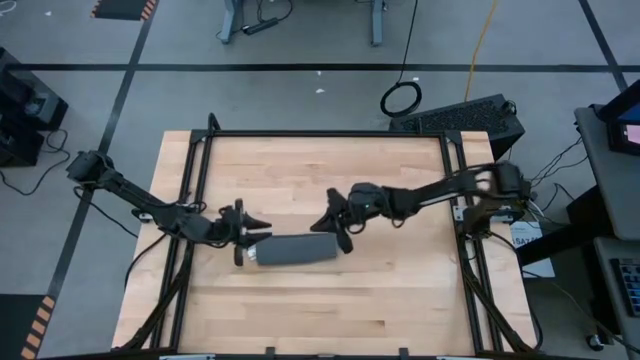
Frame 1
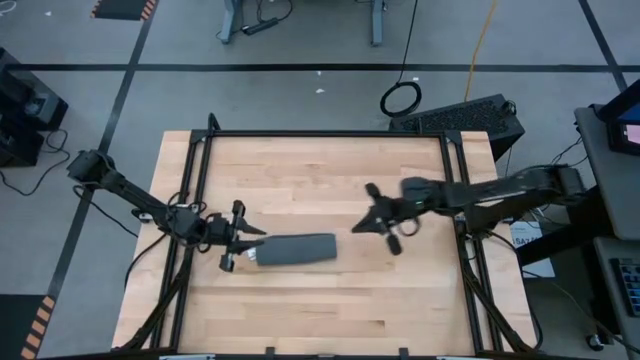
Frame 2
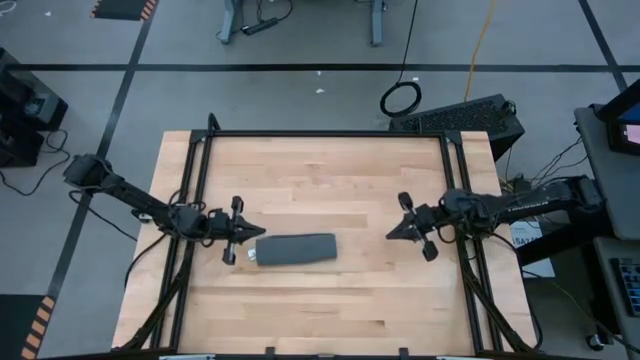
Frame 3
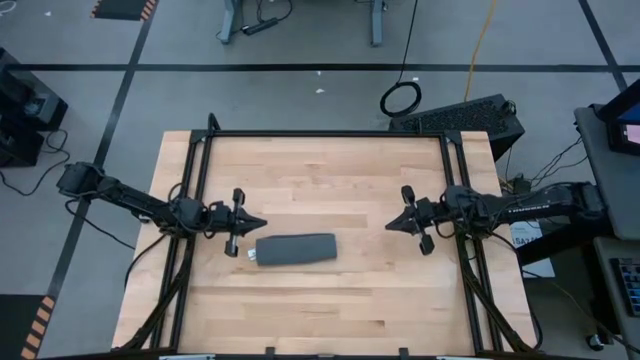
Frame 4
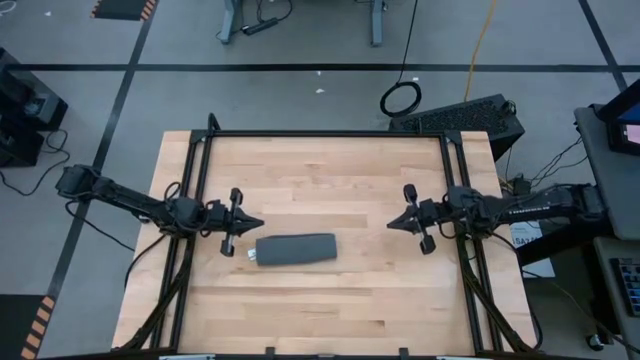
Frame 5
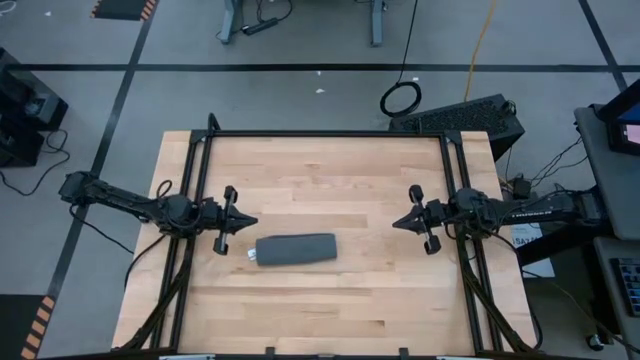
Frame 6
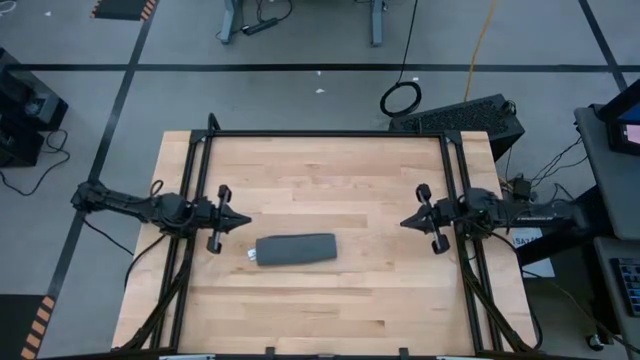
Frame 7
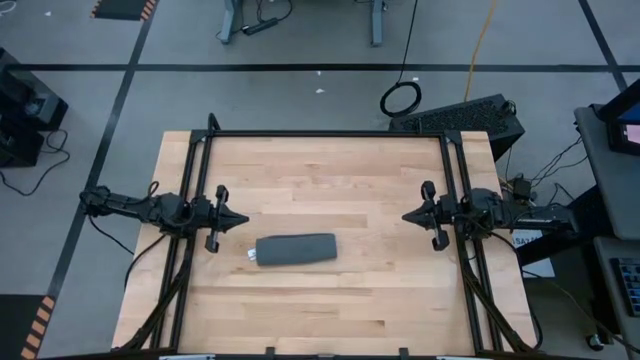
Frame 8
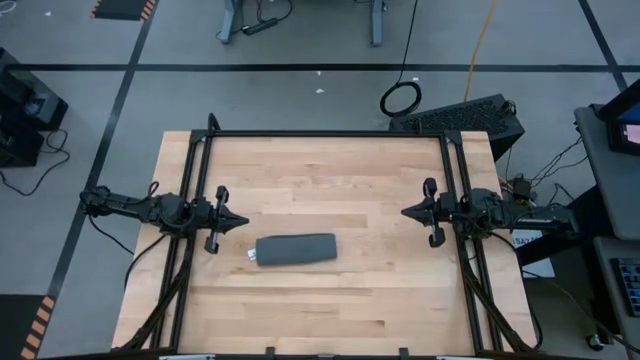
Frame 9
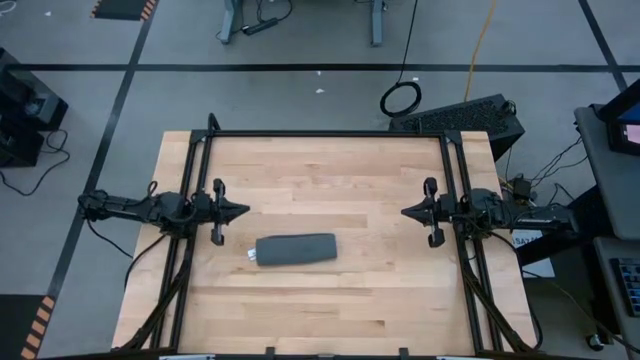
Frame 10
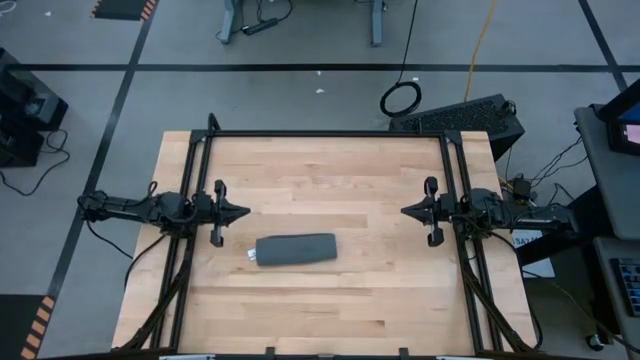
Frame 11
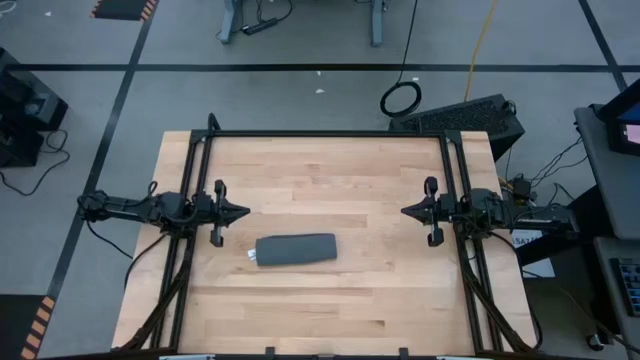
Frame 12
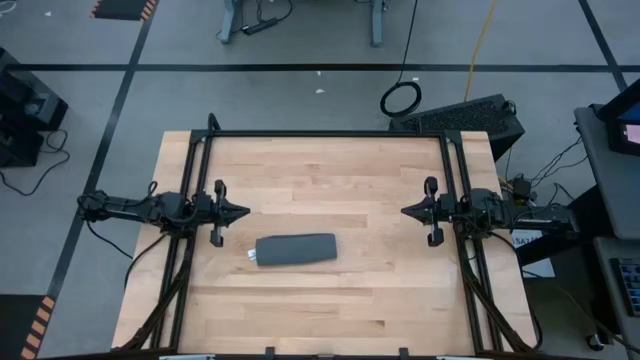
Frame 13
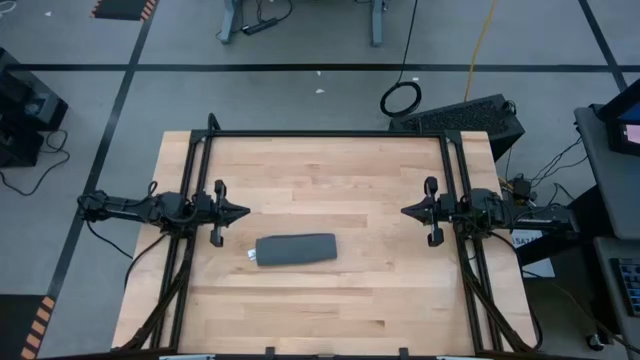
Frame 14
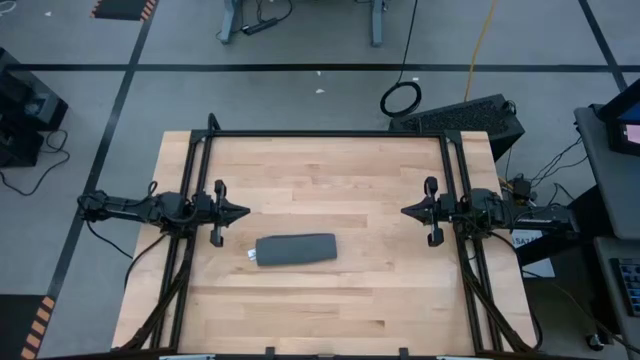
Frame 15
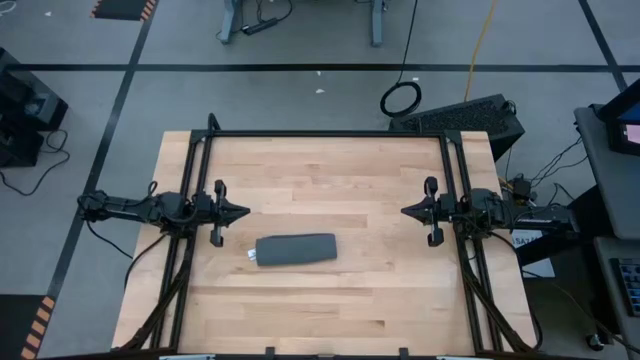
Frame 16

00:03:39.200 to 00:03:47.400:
Task: Roll towel into tight, uniform cylinder
Return to Home Position

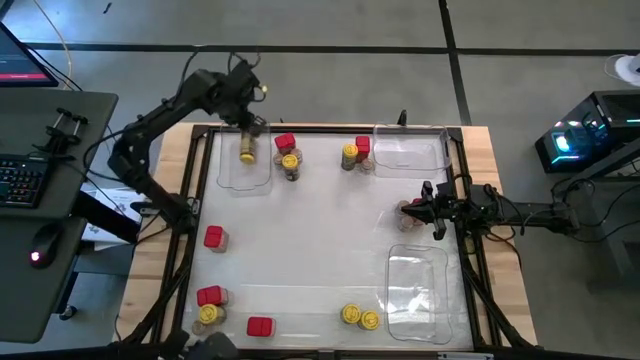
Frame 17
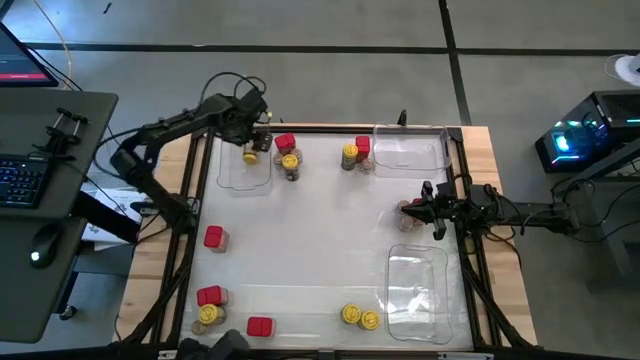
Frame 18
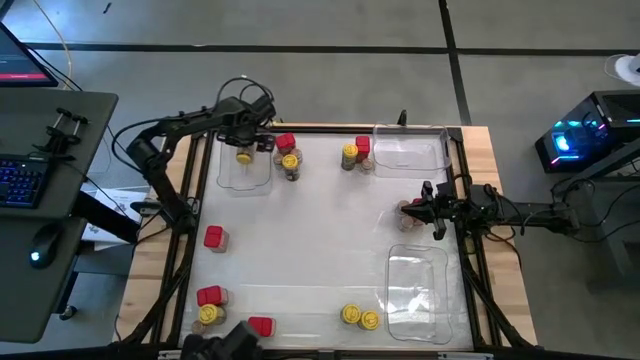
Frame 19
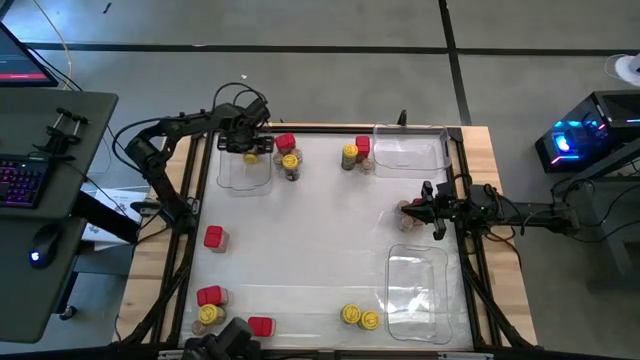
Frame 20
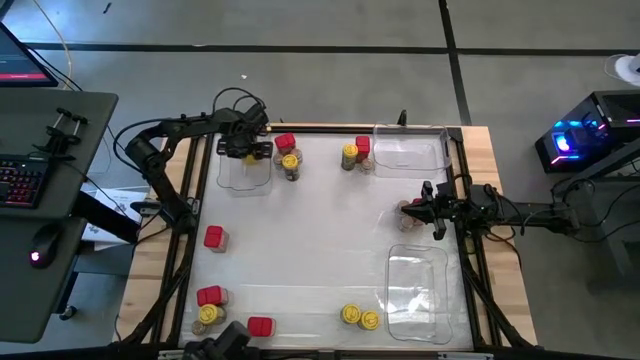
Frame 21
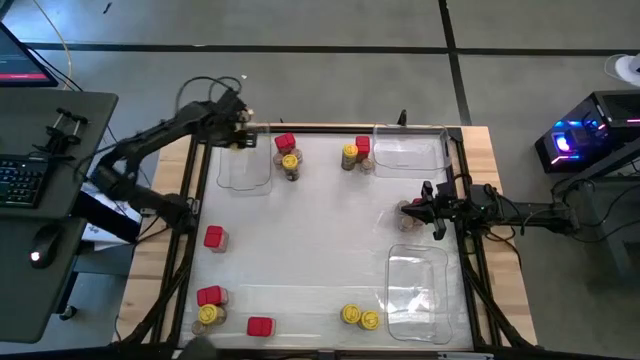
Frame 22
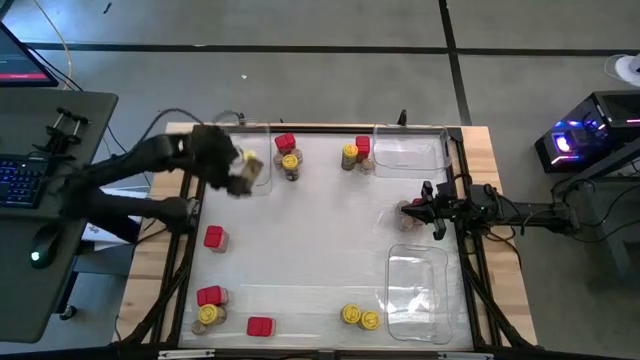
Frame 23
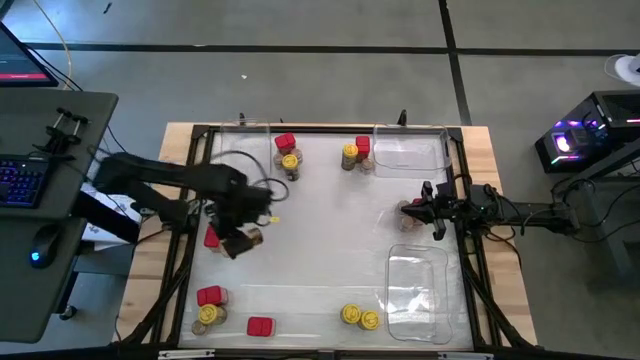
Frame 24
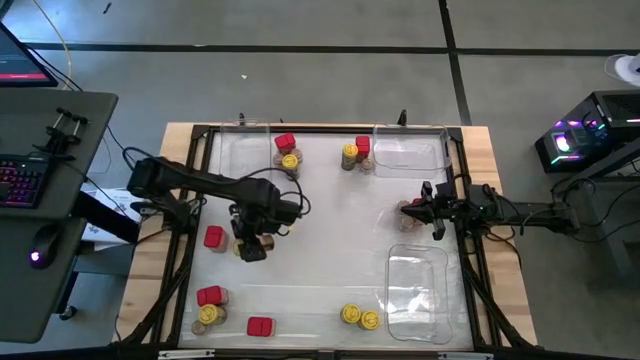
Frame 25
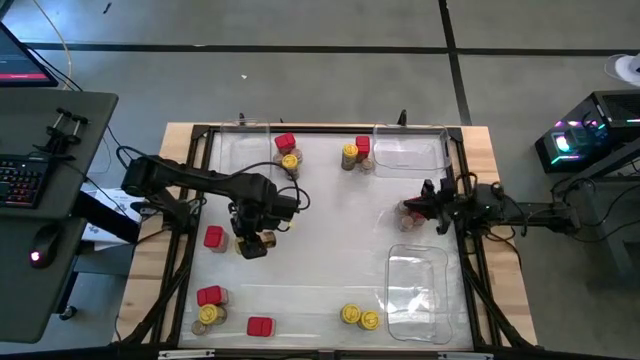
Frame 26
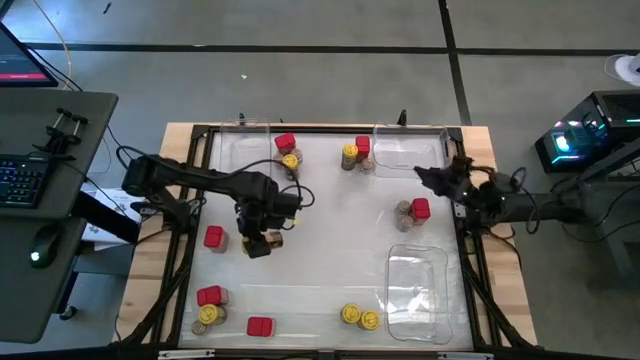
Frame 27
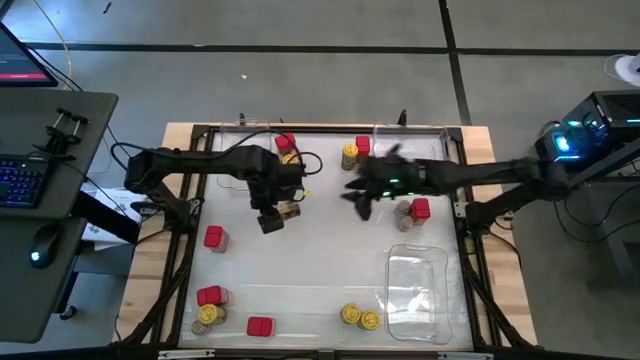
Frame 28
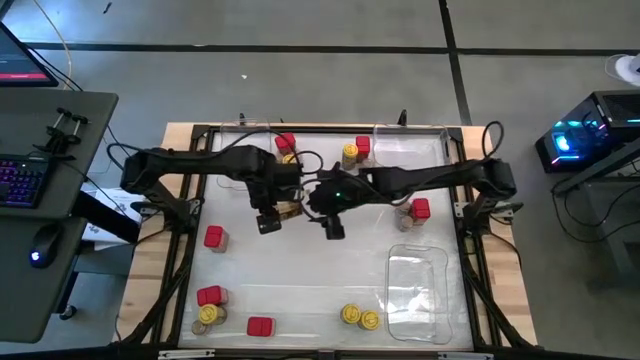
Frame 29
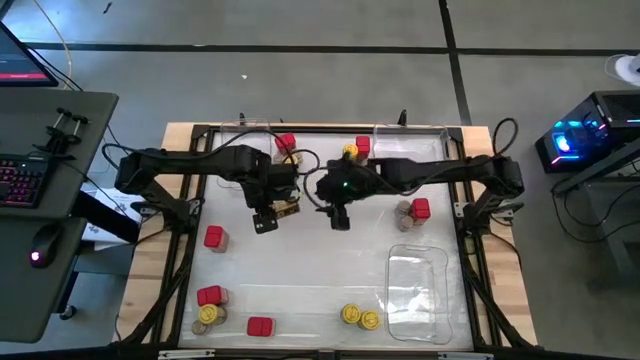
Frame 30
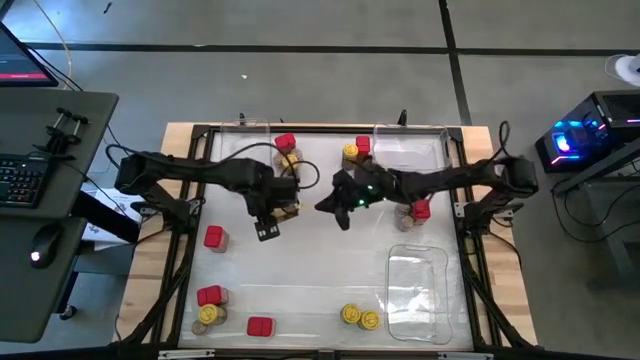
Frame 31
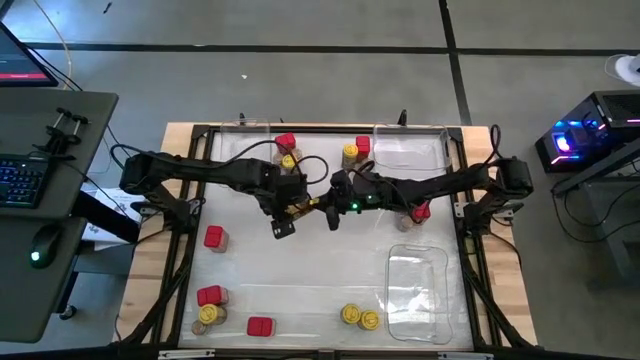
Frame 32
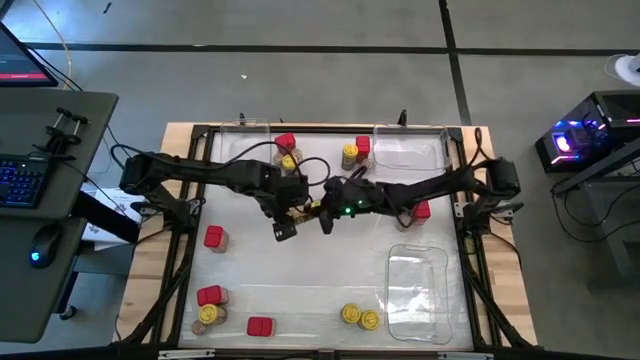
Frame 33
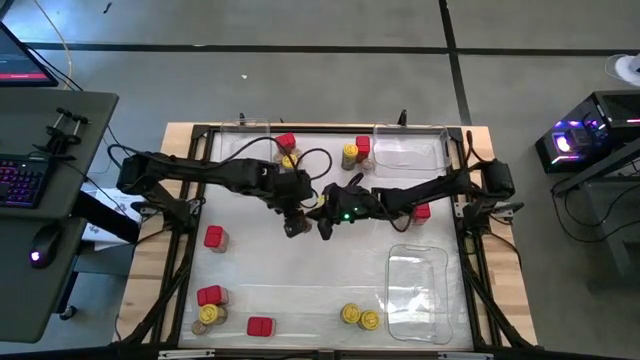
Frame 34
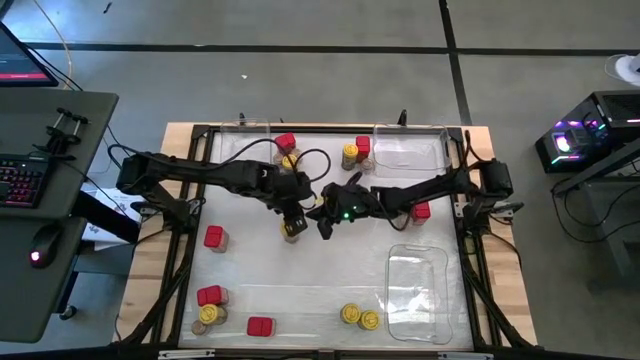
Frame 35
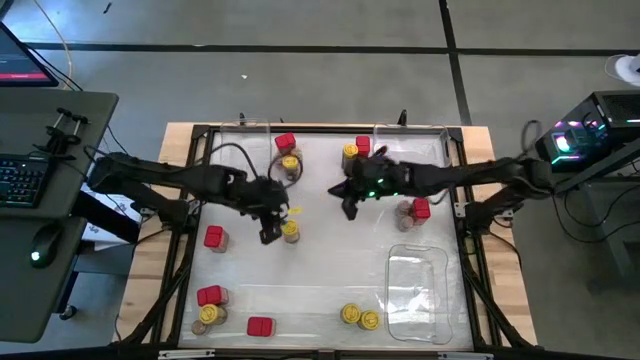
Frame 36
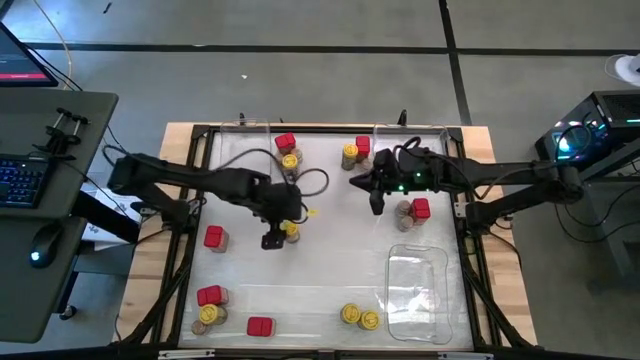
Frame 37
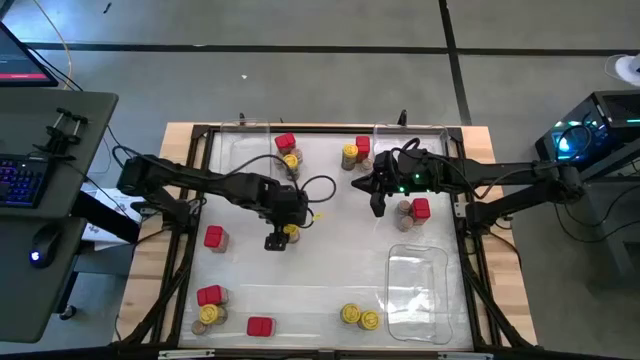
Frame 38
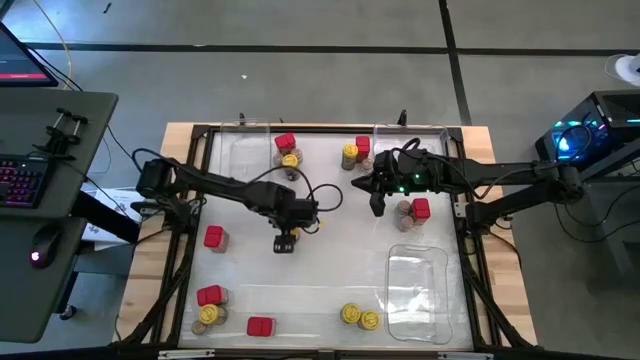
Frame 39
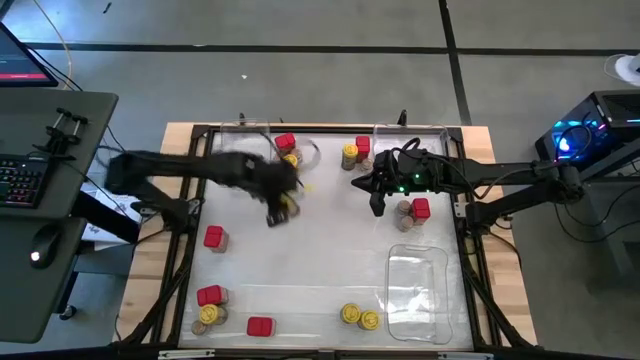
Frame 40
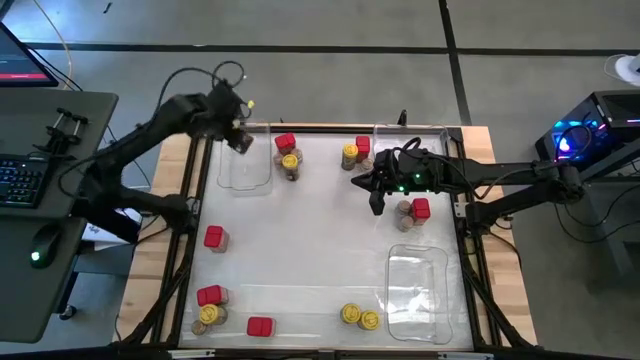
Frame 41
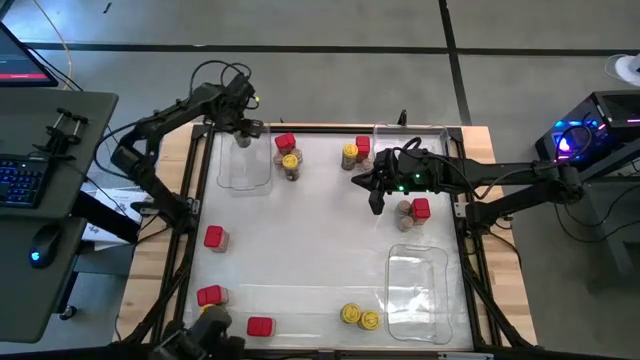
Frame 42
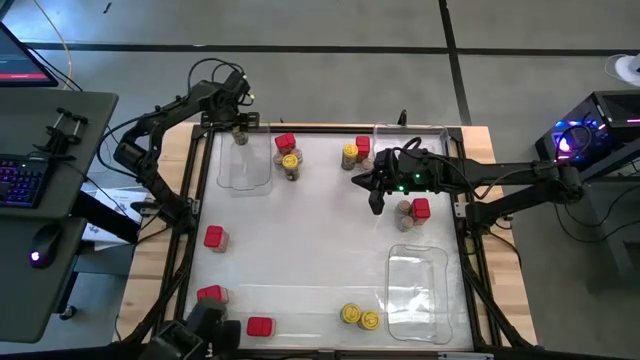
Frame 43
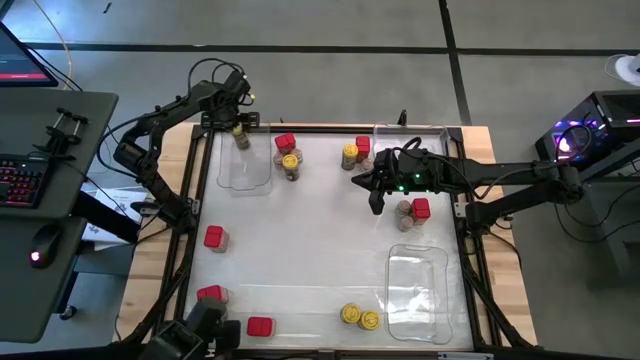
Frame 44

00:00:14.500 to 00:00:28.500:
Task: Sort spices by type
Put the yellow seasoning bottle into the top left transparent bin
